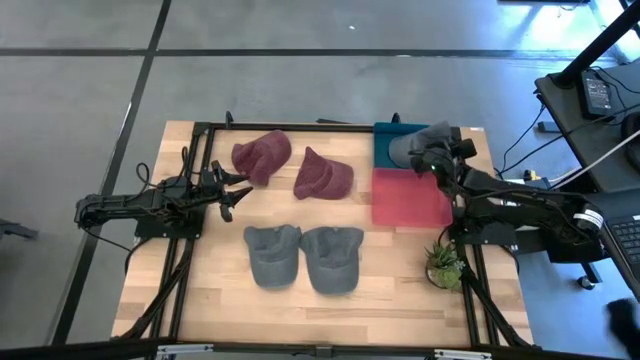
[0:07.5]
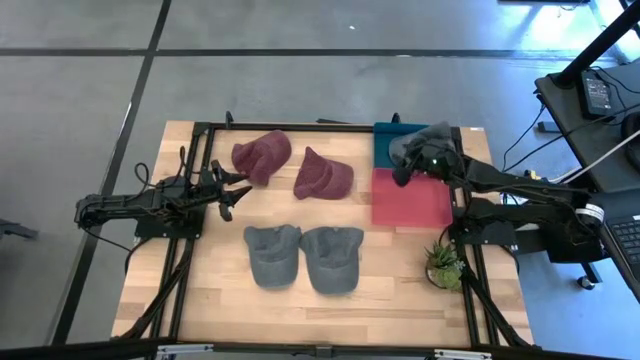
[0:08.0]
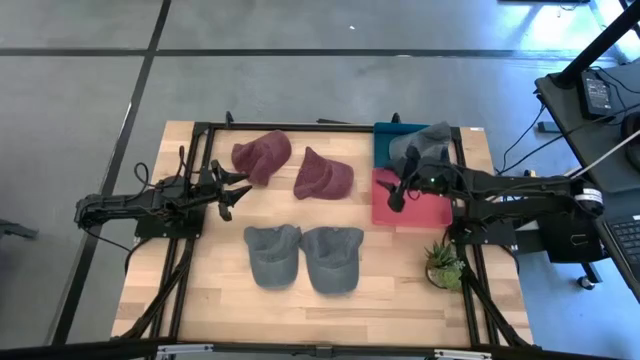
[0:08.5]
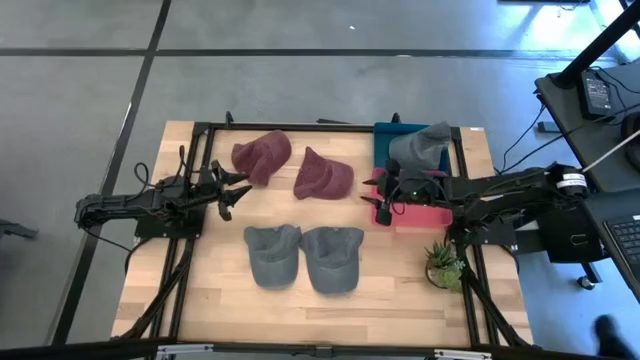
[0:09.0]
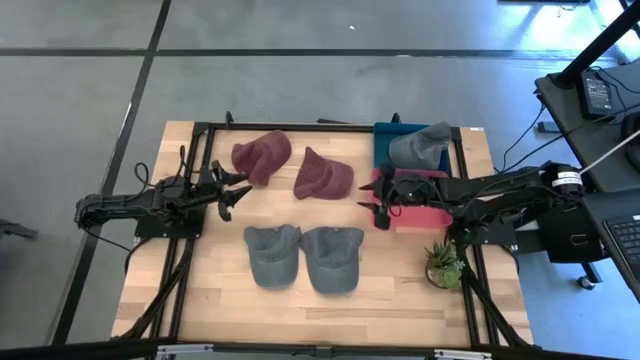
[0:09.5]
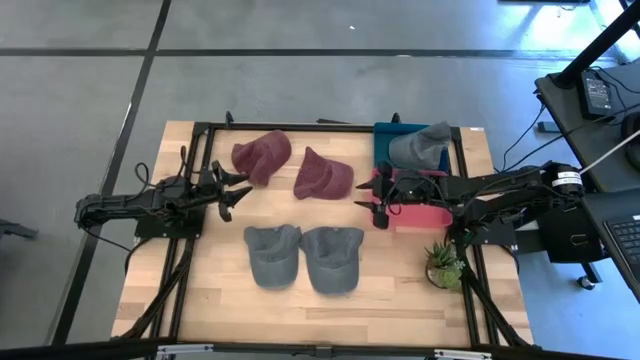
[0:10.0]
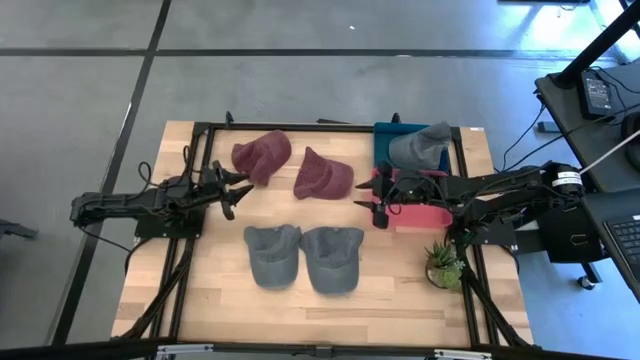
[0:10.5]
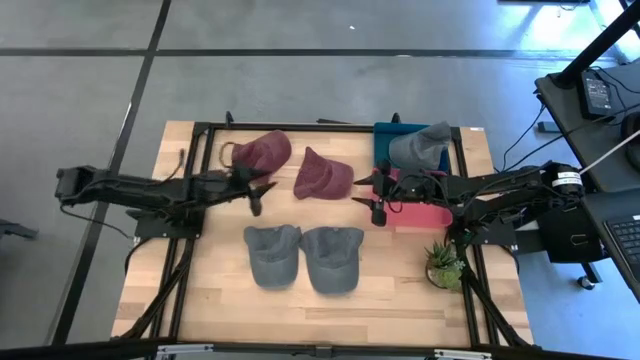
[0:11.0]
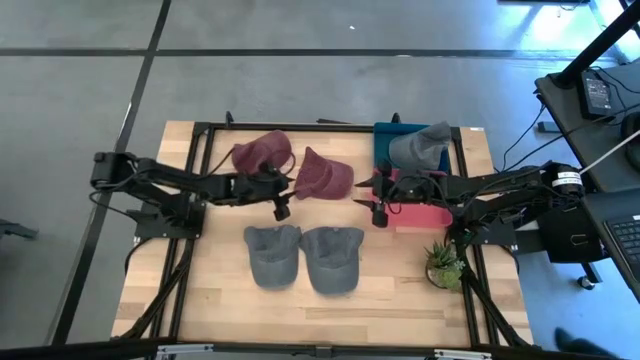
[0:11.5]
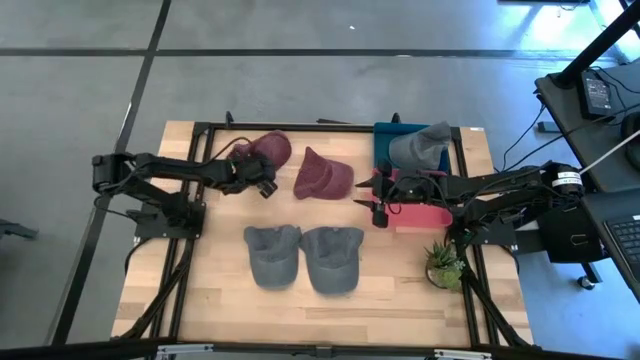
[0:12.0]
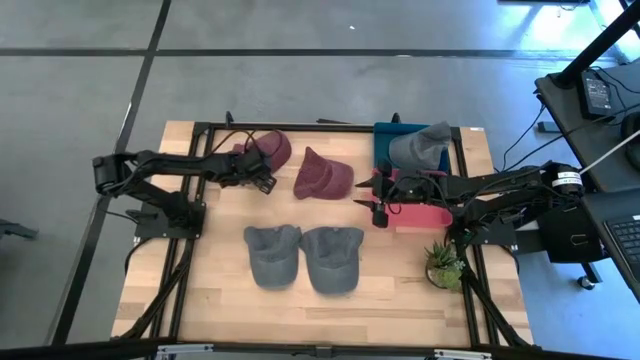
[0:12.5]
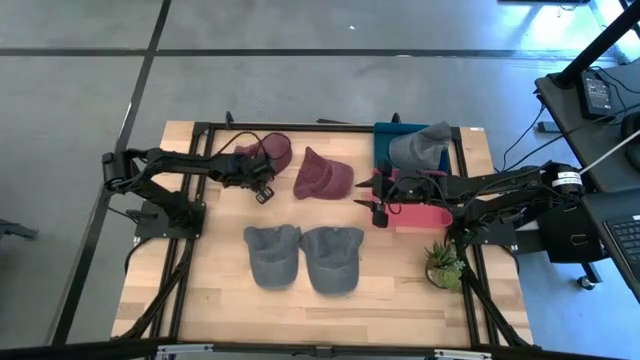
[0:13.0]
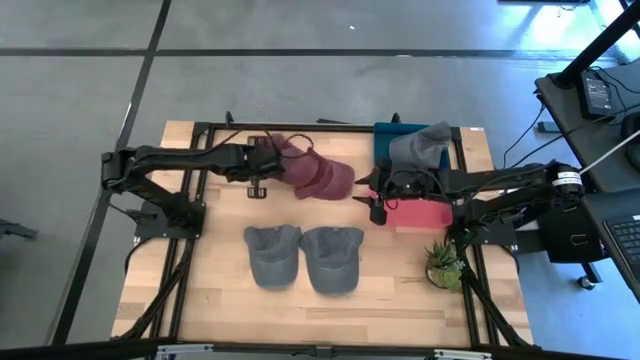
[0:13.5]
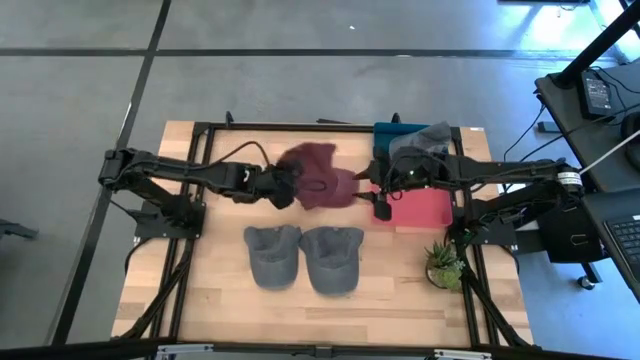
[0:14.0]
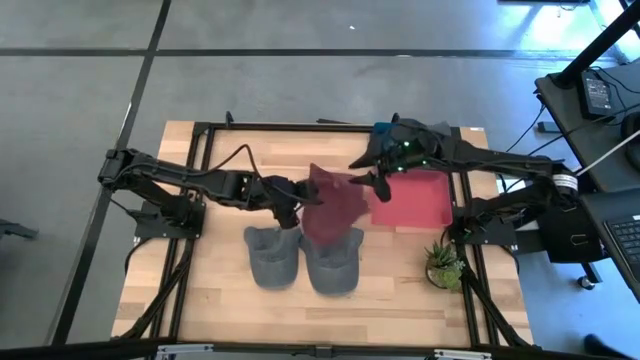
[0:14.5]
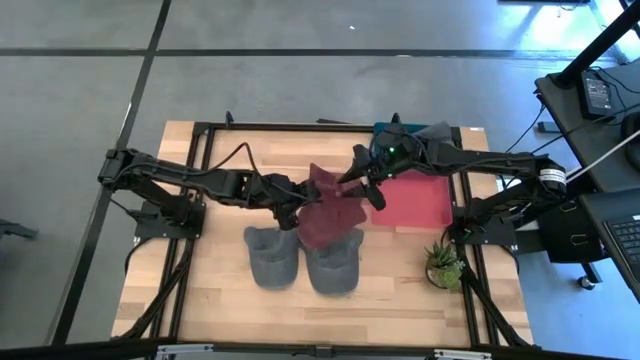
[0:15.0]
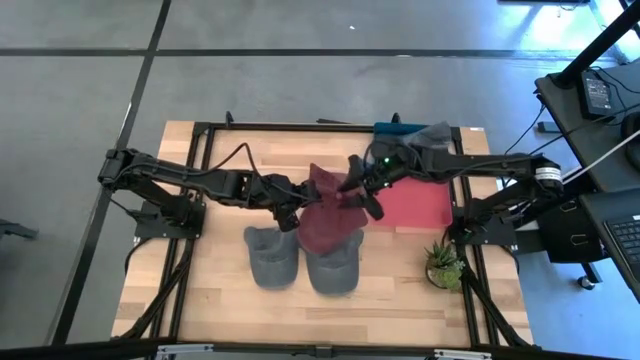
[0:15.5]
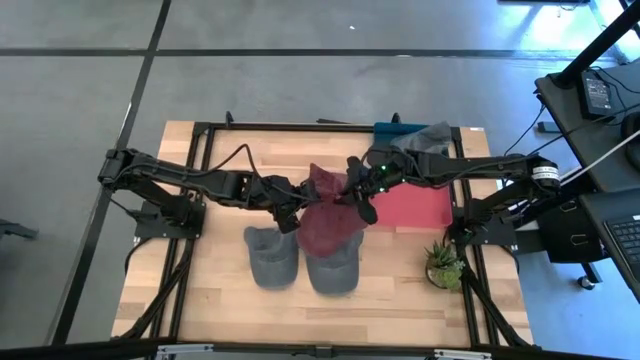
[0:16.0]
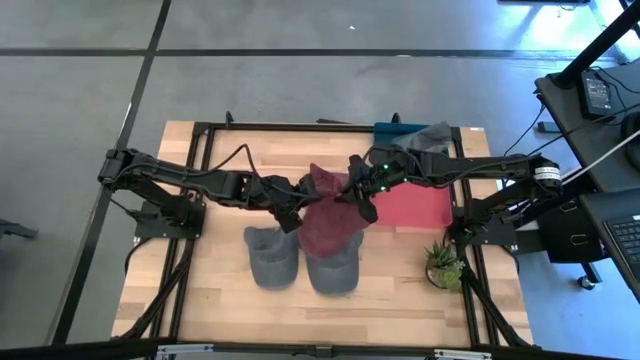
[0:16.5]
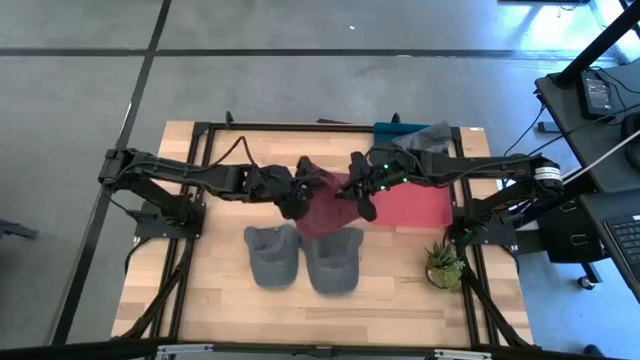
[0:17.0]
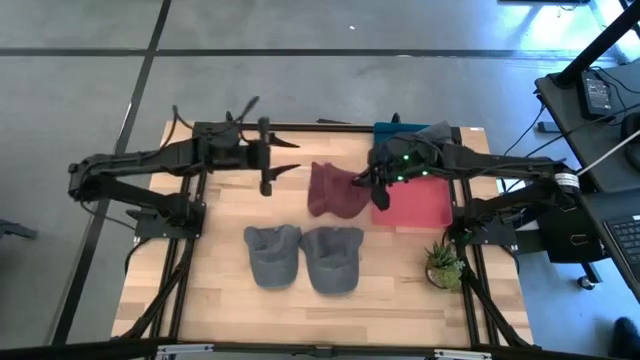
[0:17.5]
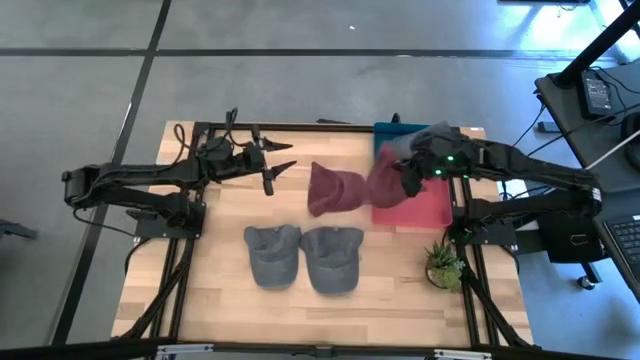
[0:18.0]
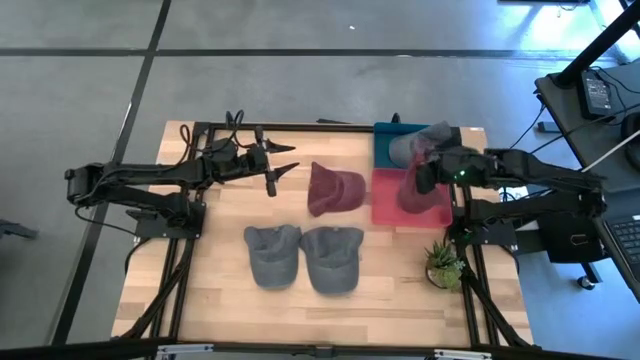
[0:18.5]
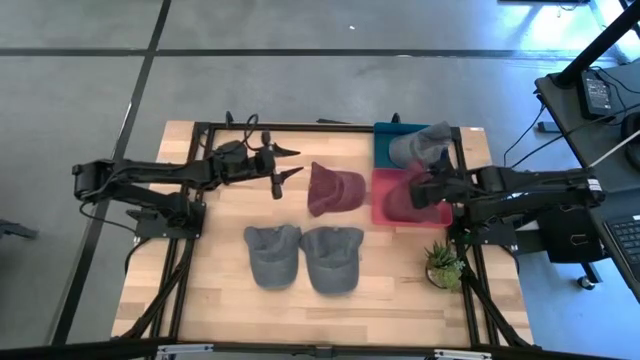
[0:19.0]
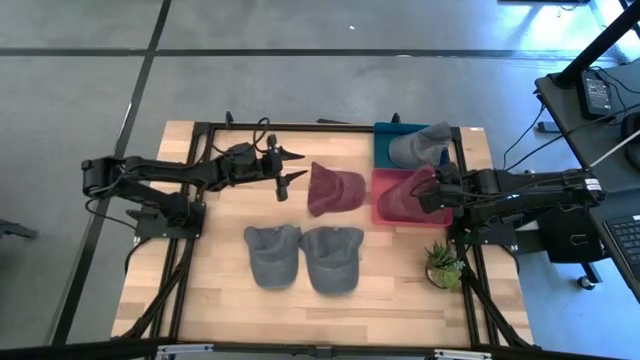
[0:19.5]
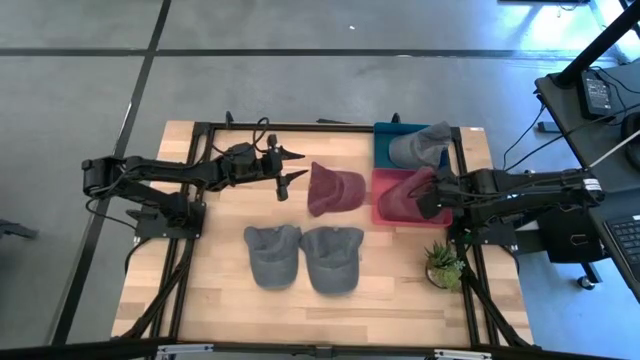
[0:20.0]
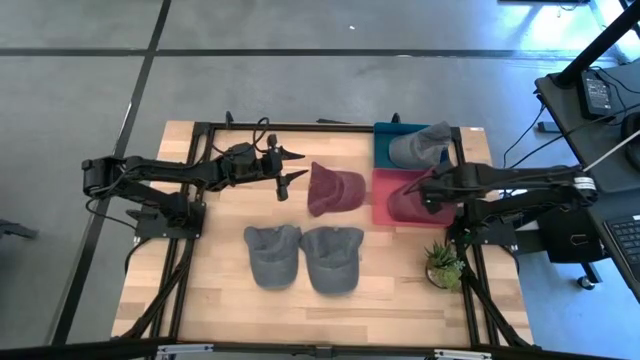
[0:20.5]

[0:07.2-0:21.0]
Task: Pick & Place hat
Put the left red cap into the pink bin

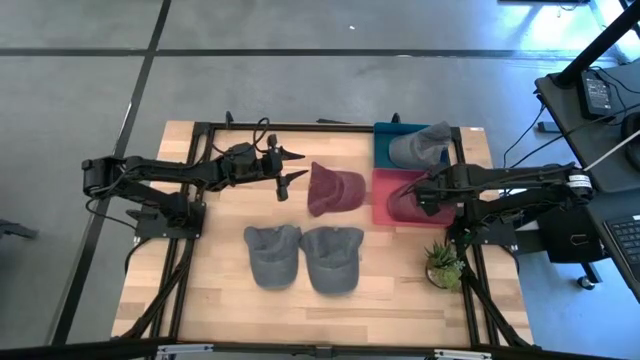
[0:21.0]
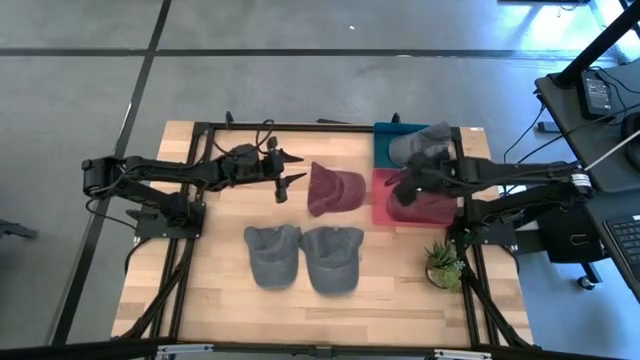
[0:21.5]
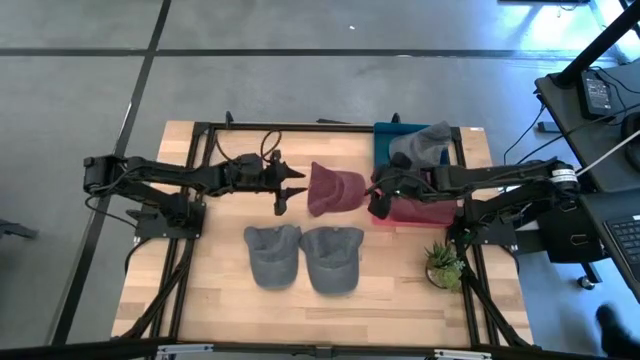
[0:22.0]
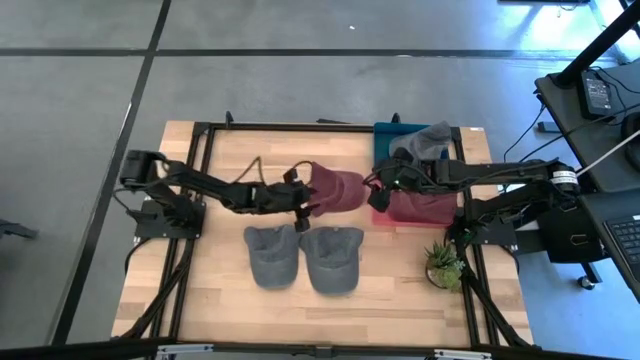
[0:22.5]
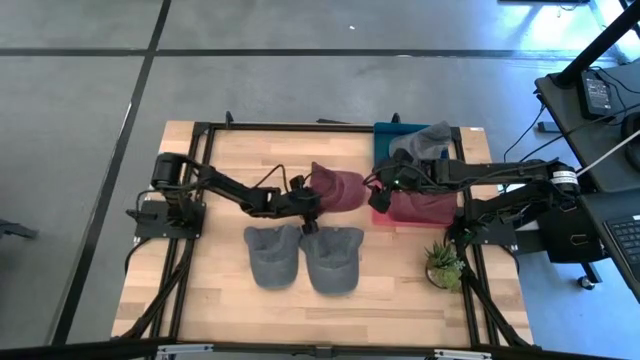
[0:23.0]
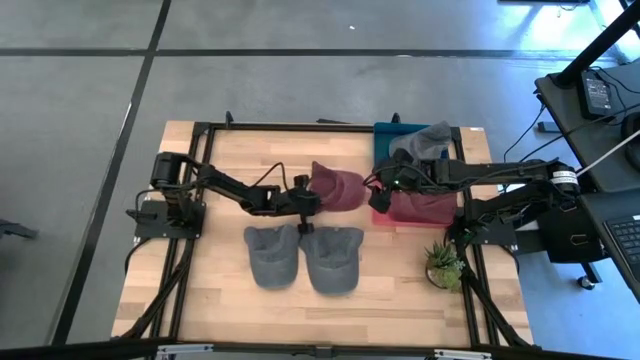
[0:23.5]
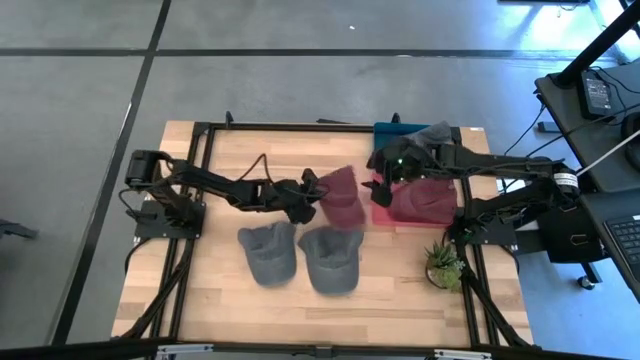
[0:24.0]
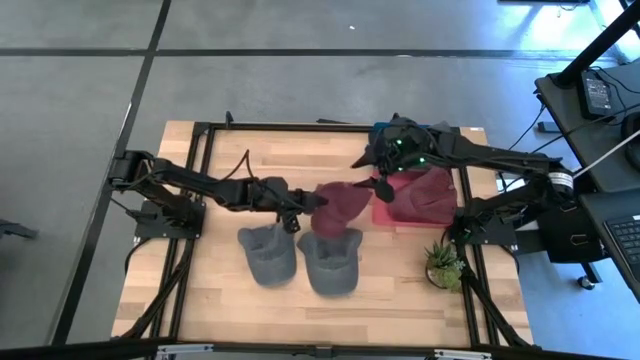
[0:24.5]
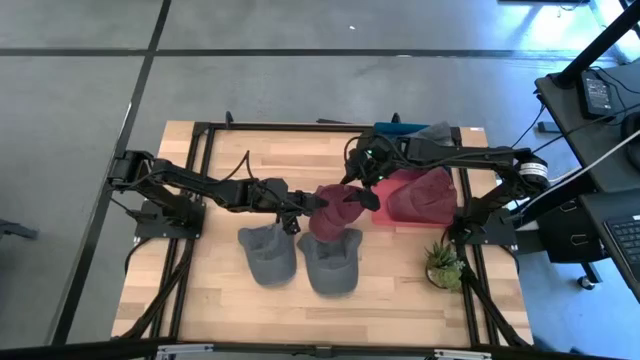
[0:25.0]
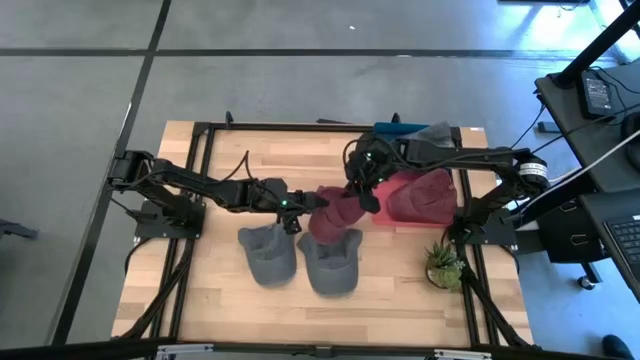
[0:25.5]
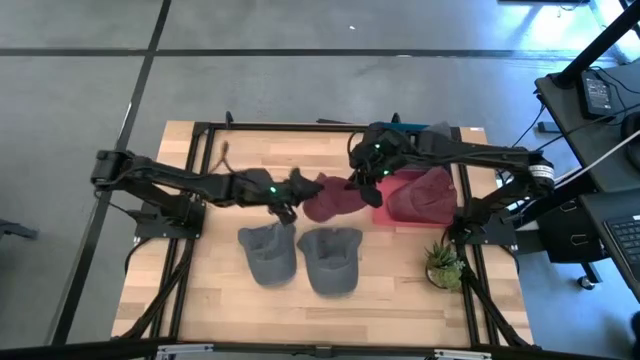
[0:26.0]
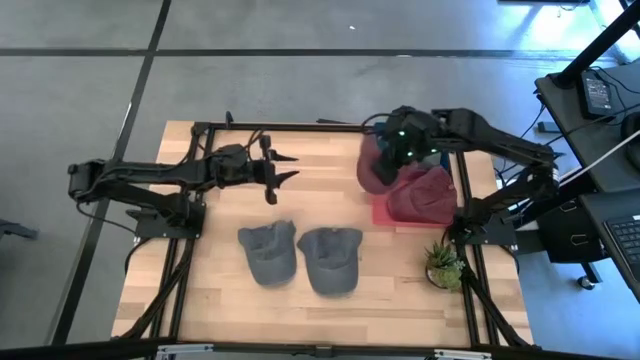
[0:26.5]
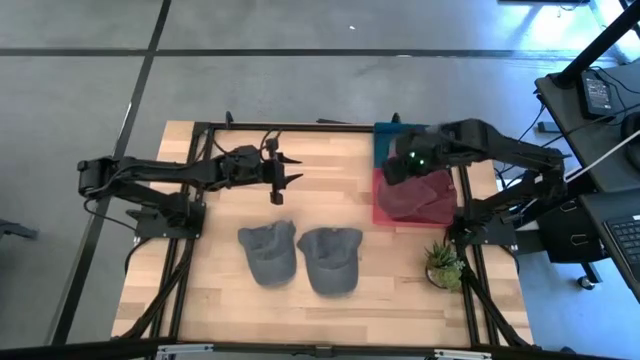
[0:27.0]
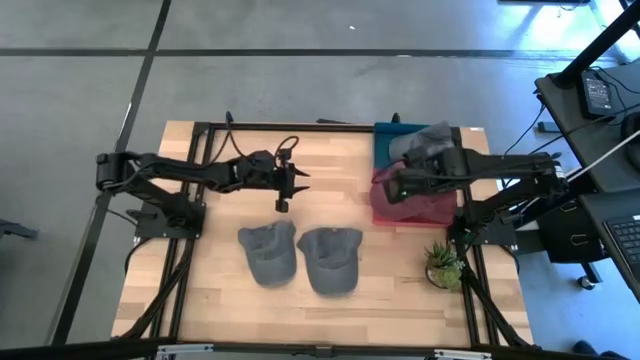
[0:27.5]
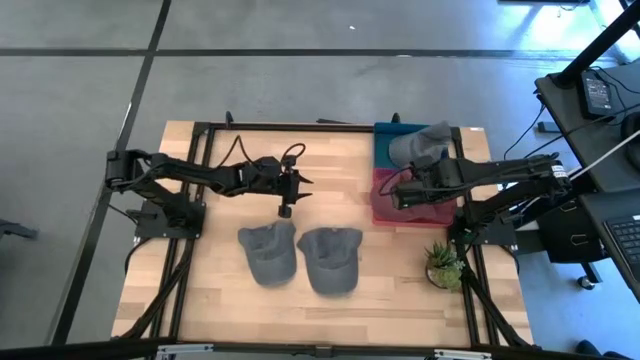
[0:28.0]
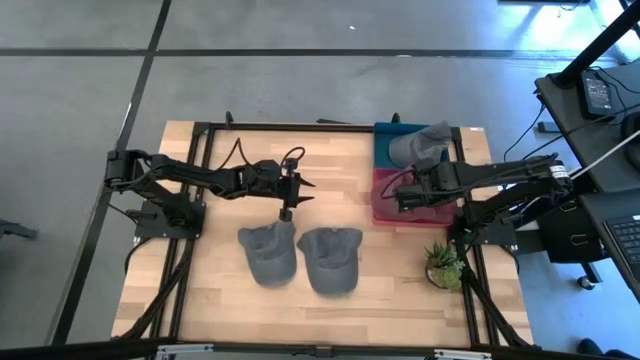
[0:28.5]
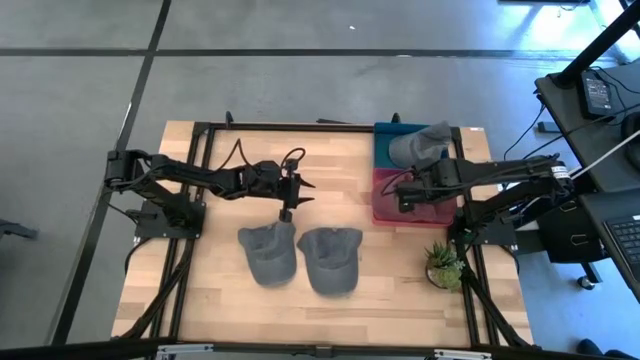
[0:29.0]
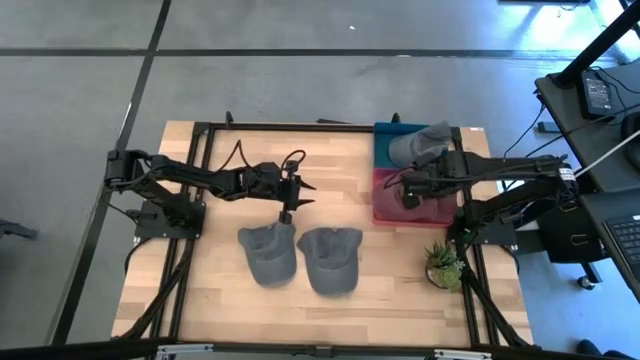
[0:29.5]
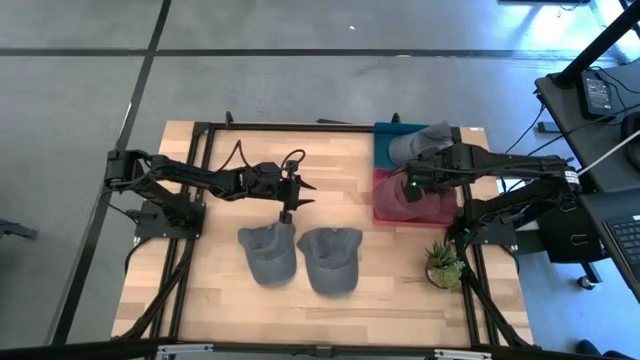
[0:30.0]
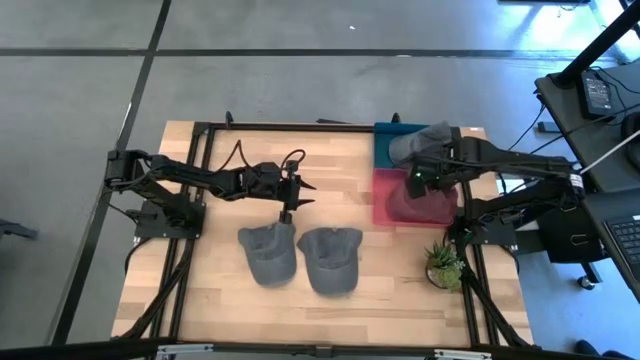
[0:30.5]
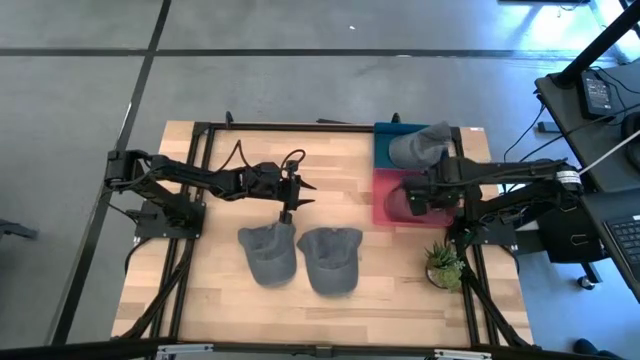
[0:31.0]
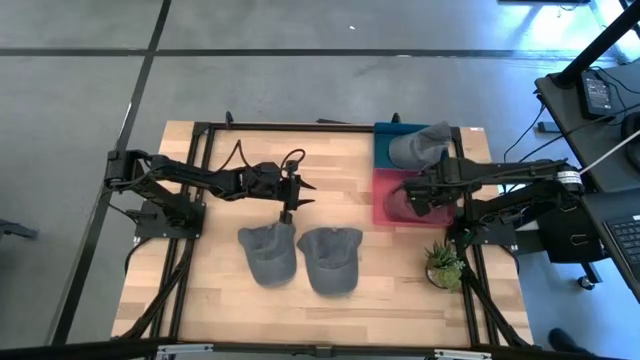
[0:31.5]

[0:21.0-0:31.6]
Put the red cap into the pink bin
